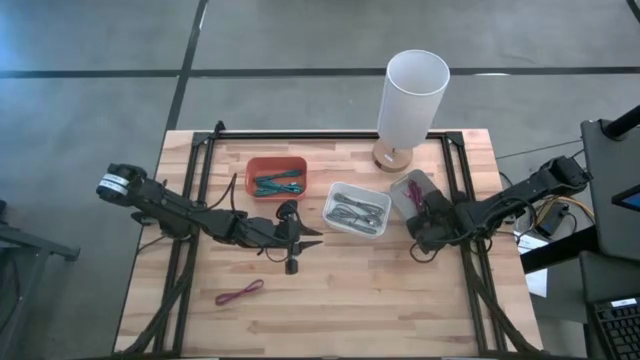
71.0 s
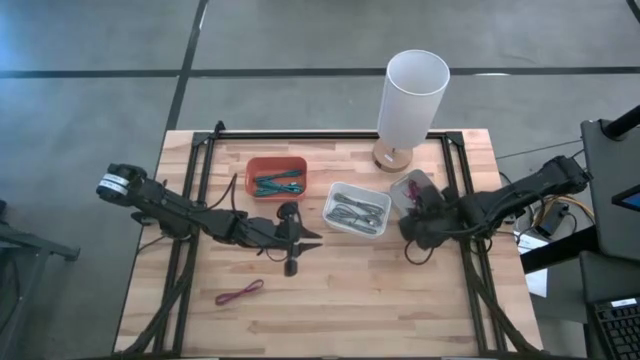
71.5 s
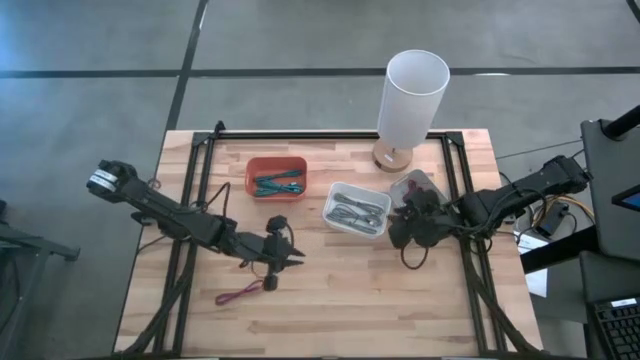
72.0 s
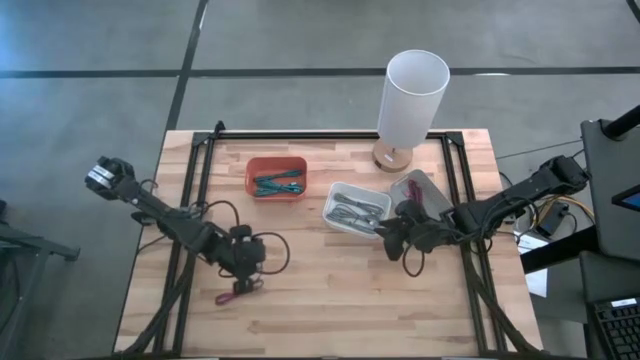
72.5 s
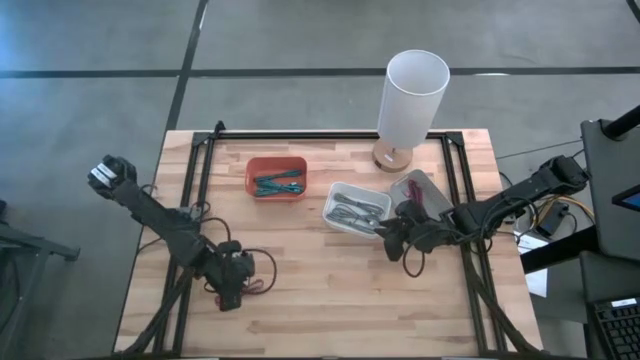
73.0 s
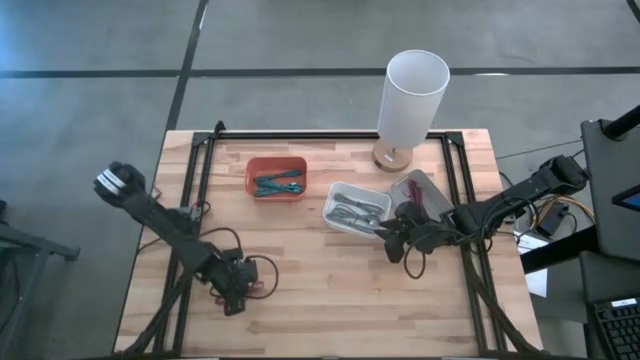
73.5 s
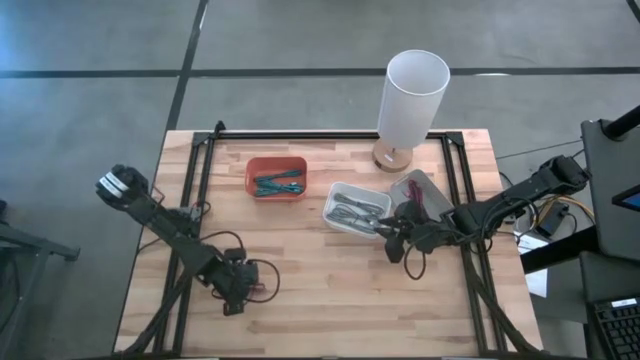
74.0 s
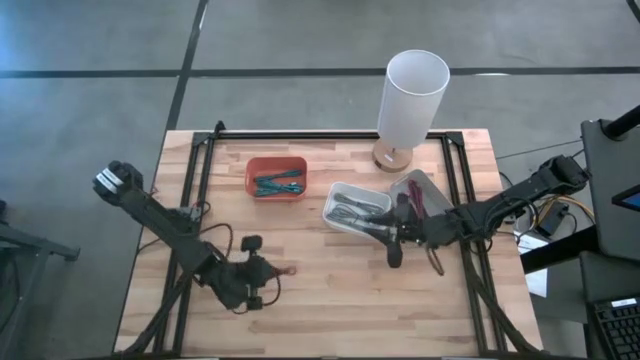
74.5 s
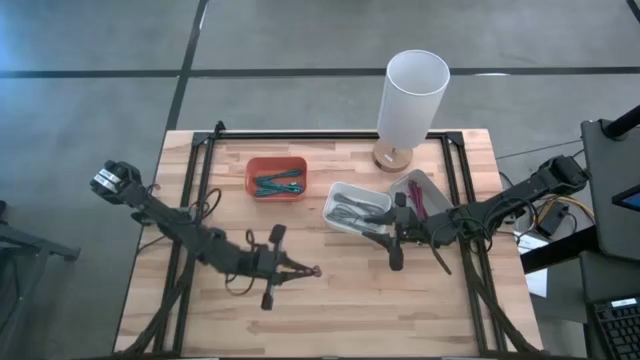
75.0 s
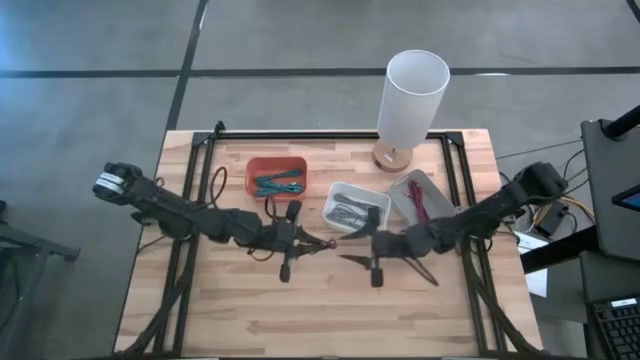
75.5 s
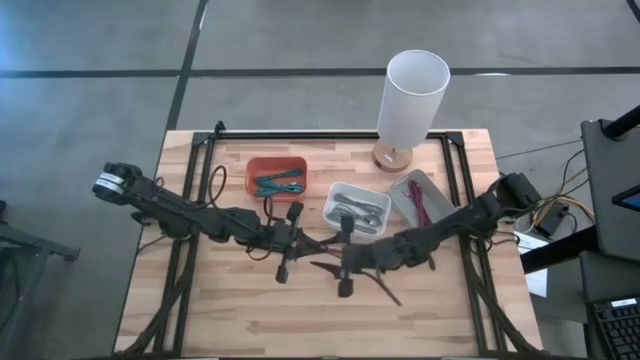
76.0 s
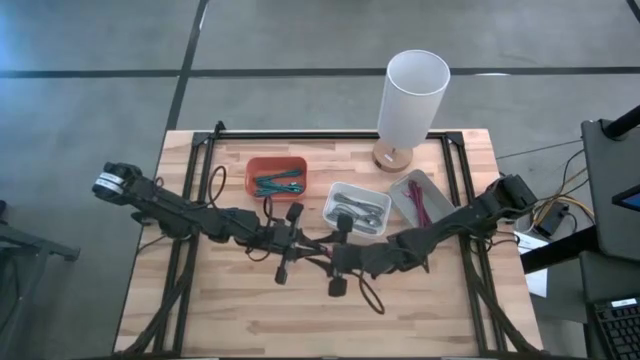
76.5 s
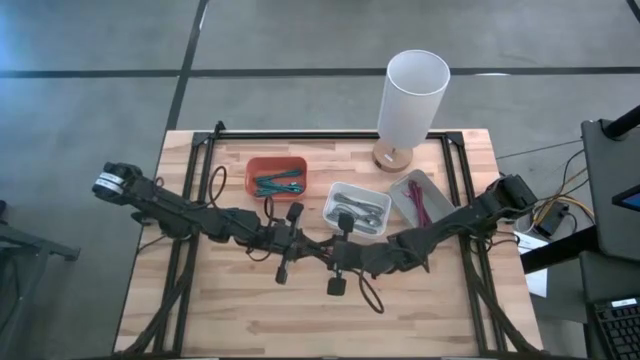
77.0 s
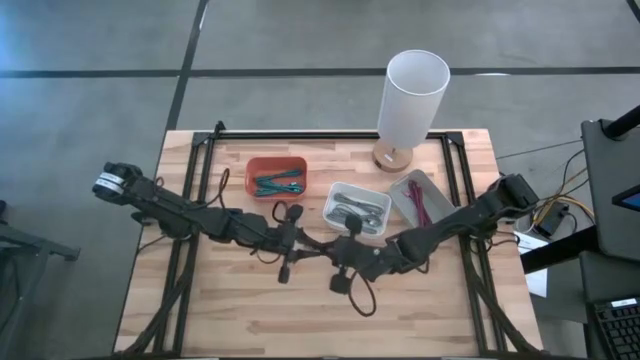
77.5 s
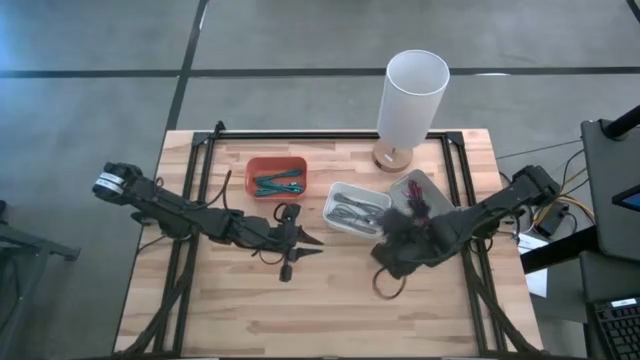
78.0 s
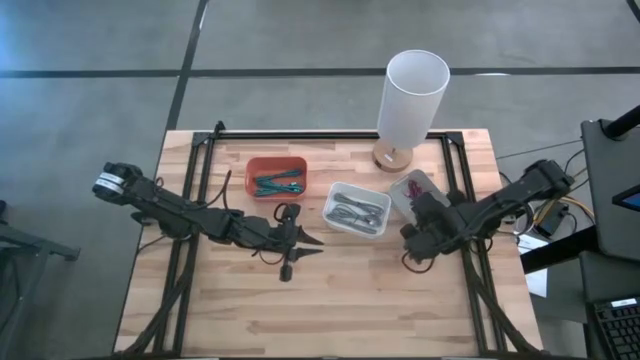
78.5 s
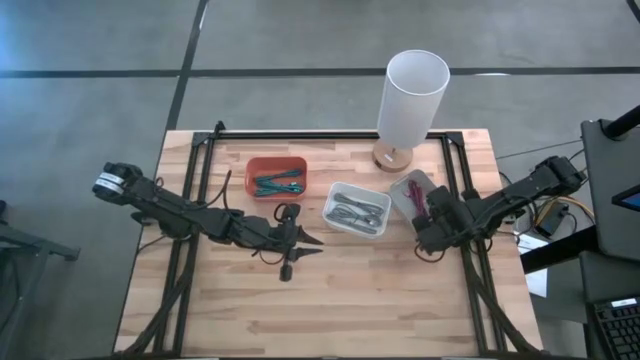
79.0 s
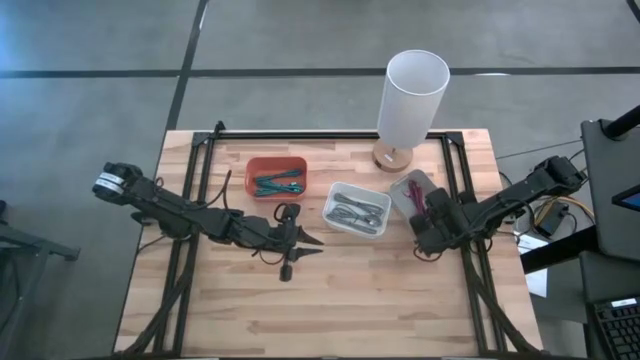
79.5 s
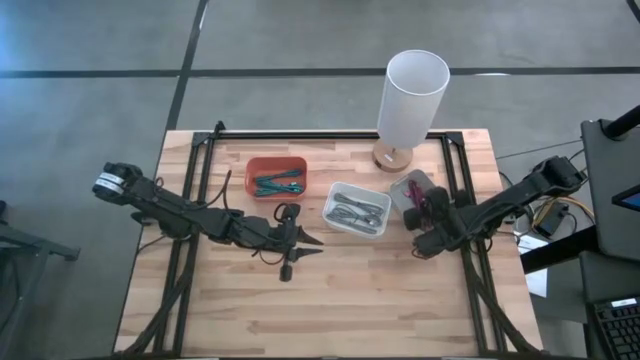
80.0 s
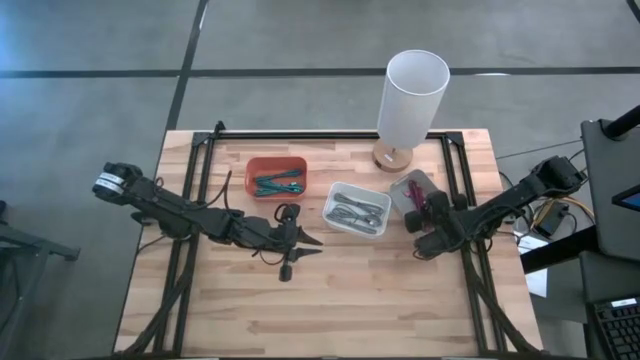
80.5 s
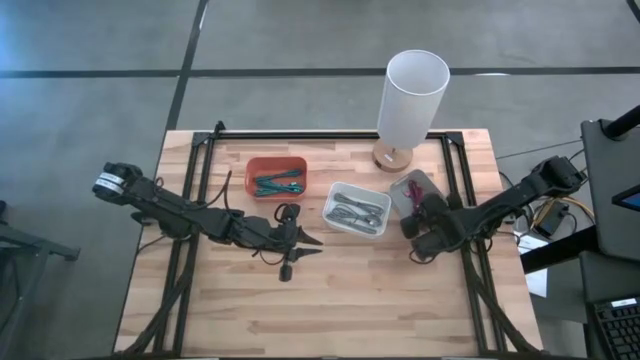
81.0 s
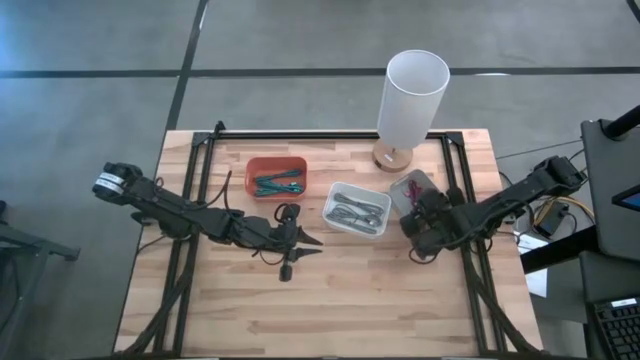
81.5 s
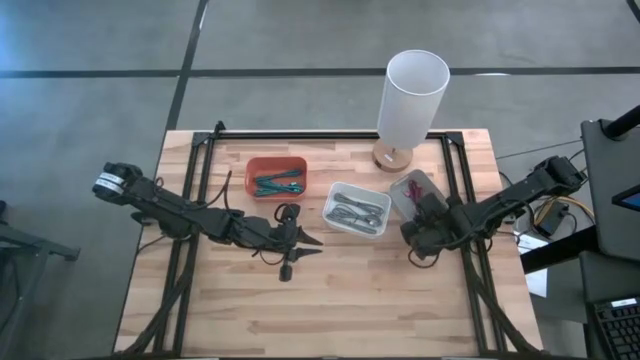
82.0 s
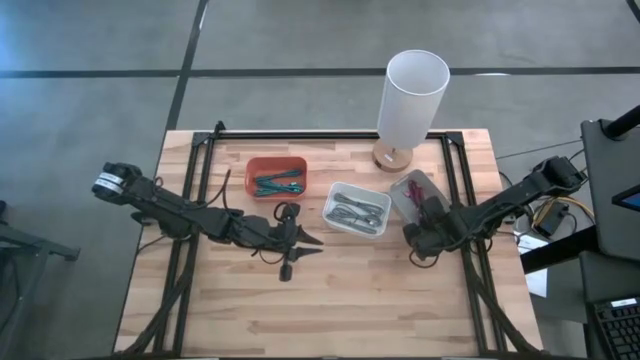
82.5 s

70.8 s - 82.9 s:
Task: Pick & Place USB Port
Put the pink charger cable into the gray bin

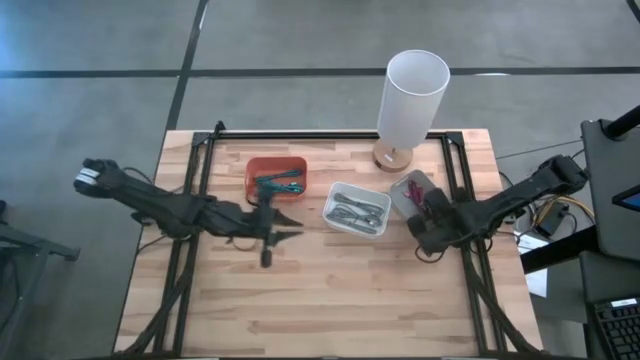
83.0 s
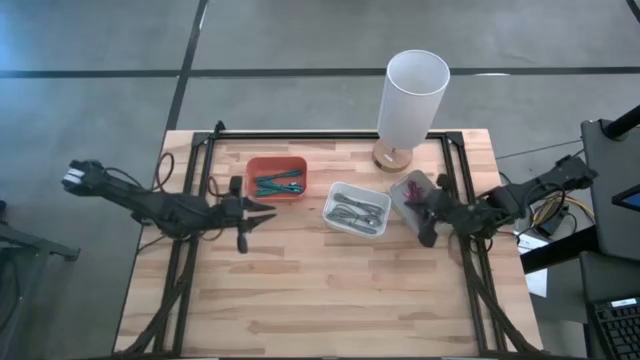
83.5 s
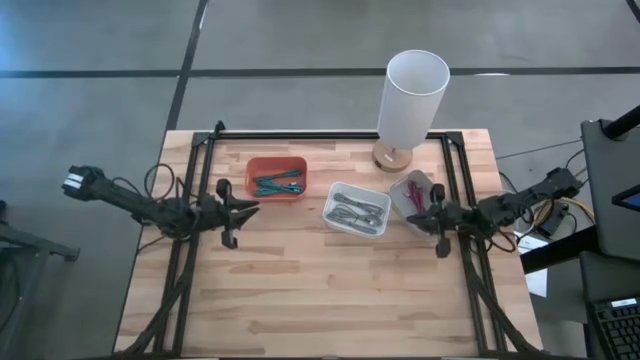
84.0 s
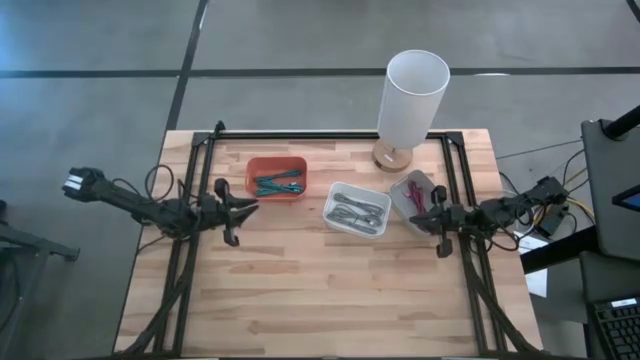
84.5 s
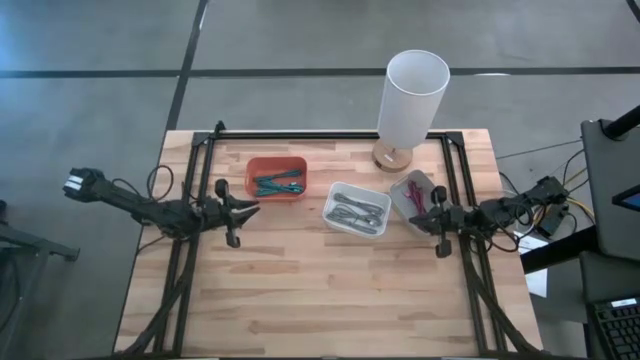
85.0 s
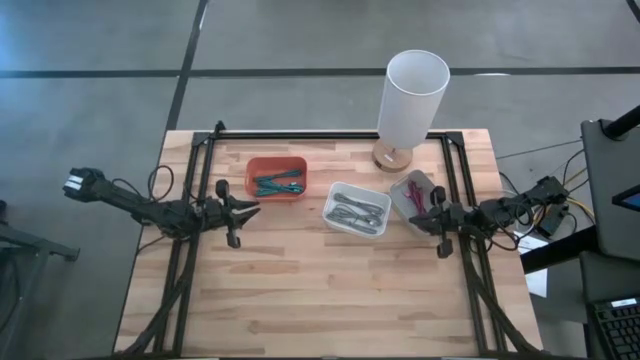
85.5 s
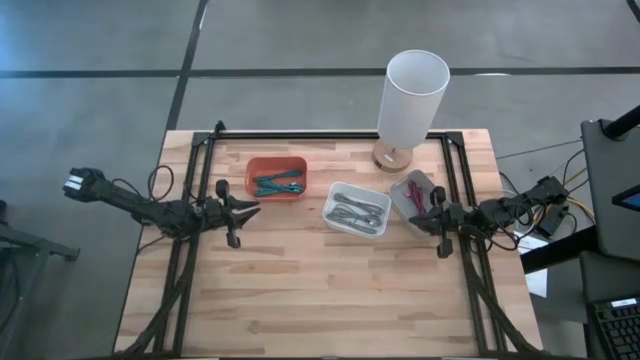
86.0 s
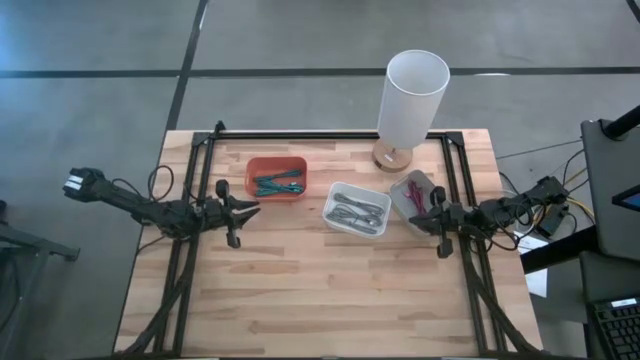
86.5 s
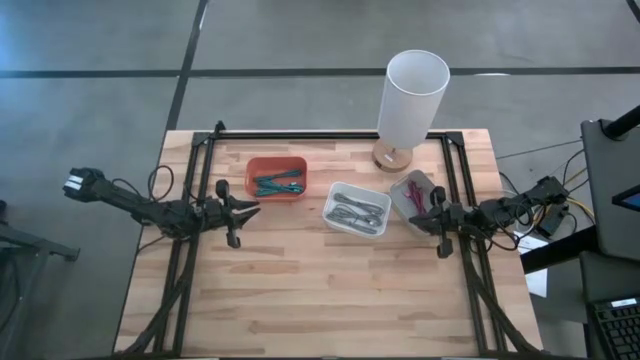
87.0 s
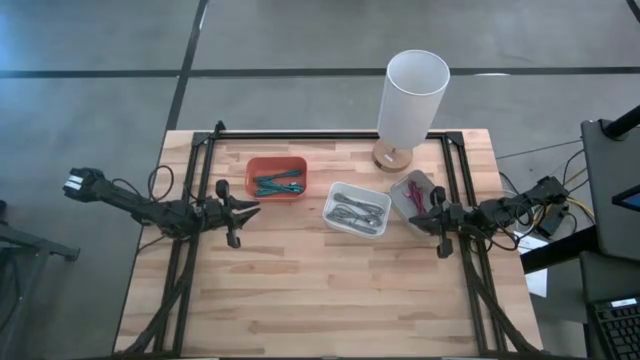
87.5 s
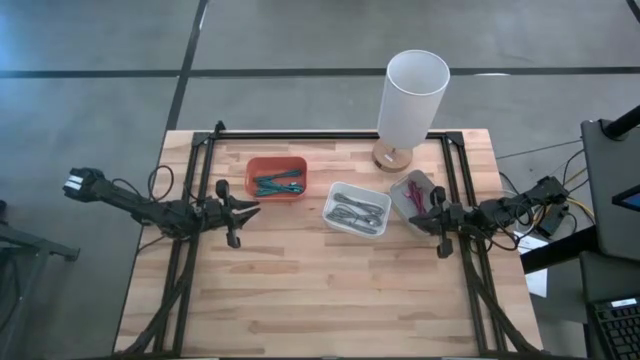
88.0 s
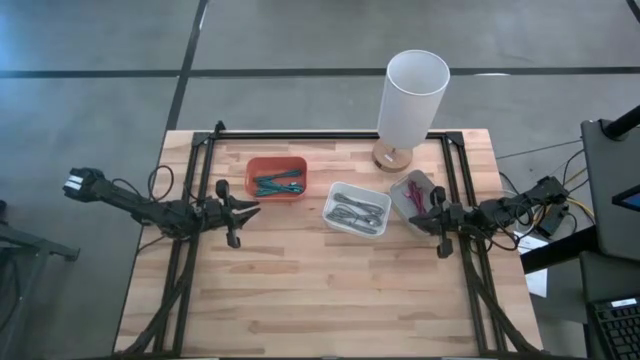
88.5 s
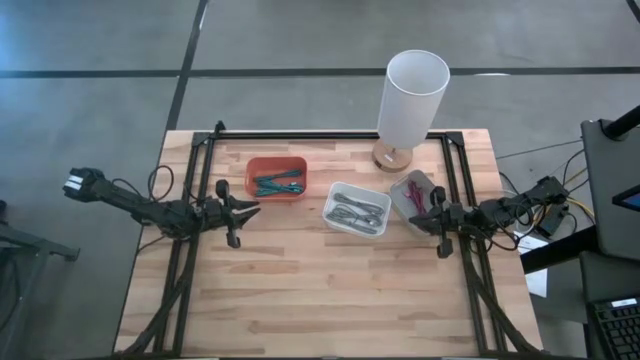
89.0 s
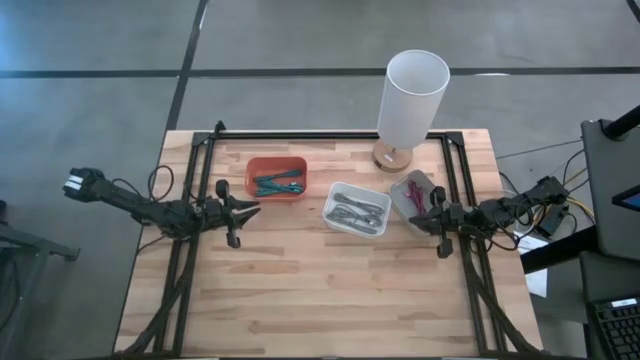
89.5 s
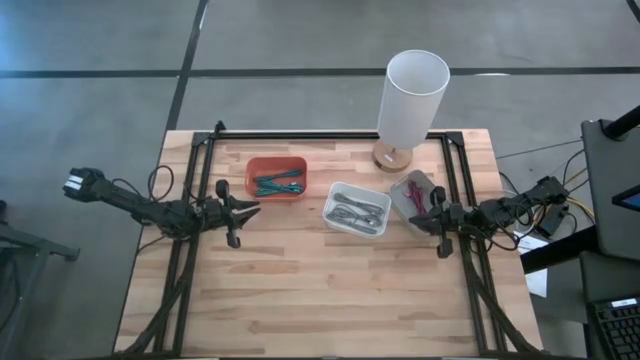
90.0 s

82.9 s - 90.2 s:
Return to Home Position

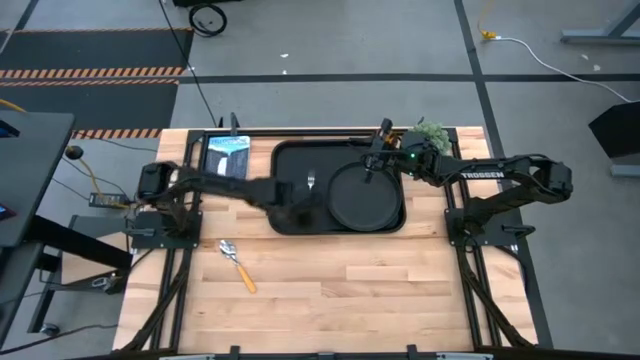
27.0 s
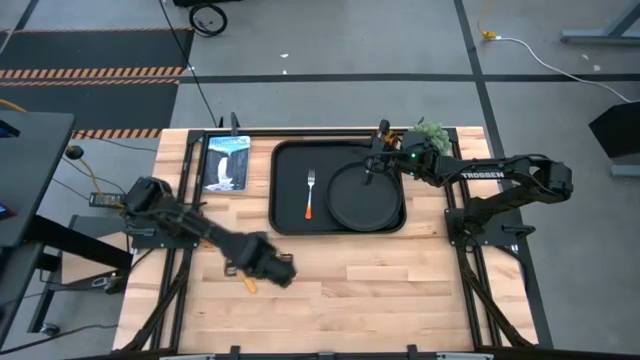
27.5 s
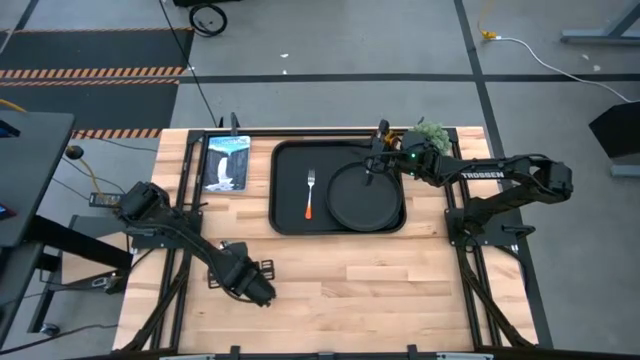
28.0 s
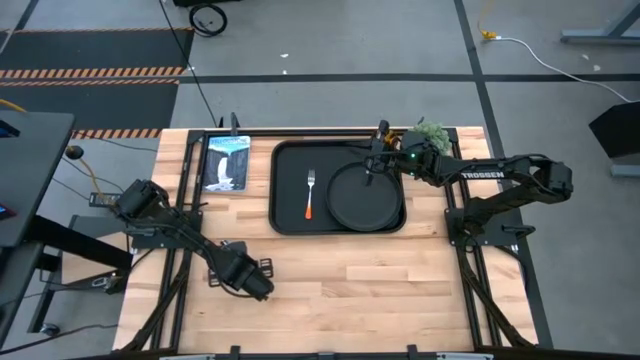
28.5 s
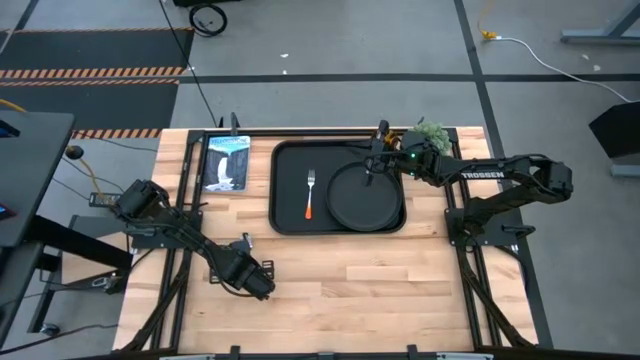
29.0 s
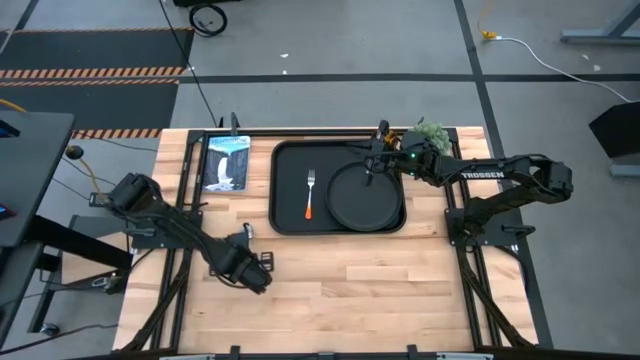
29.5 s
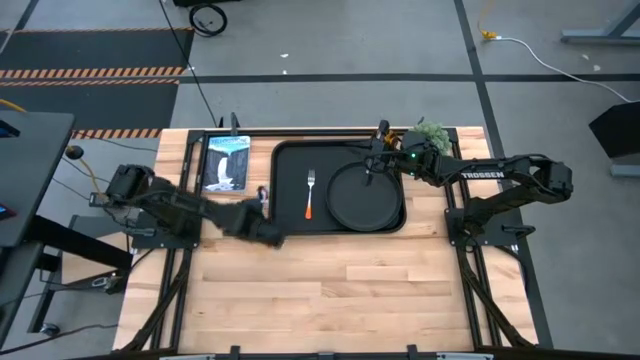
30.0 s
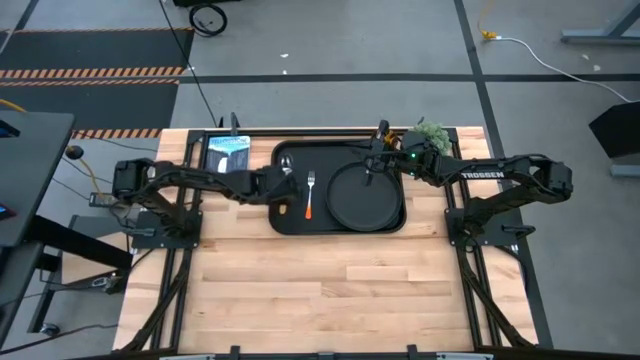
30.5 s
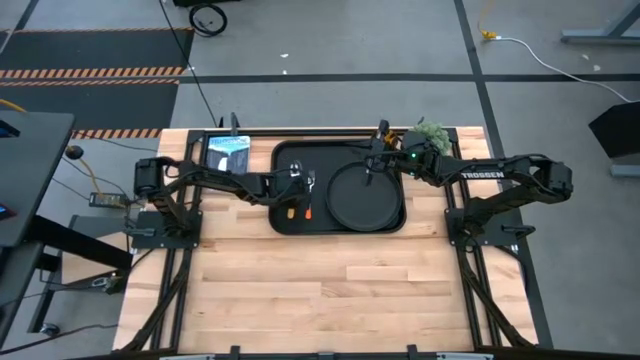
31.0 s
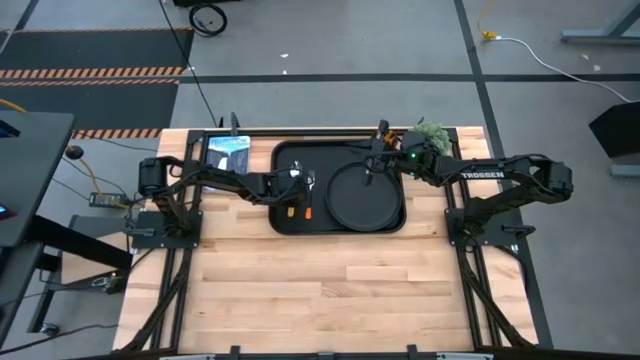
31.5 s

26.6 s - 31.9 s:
Task: Pick and place plate/cup/fork/spoon on tray
Put the yellow spoon on the black tray to the left side of the orange fork
